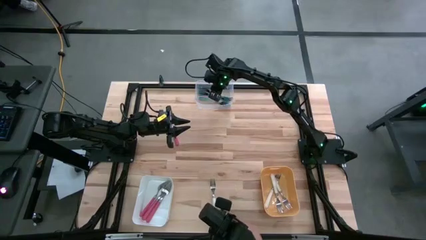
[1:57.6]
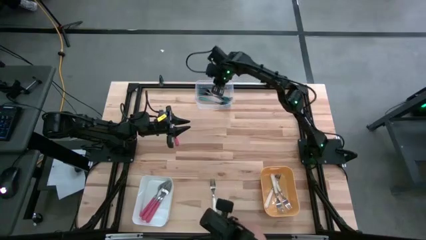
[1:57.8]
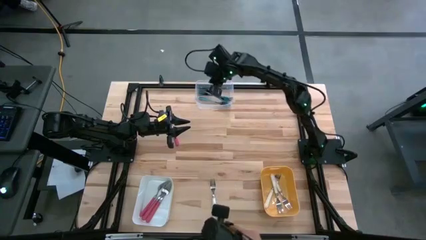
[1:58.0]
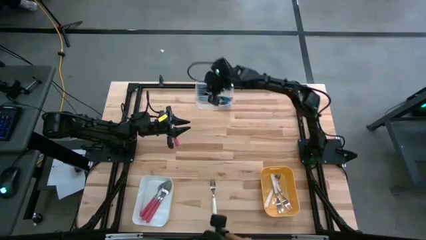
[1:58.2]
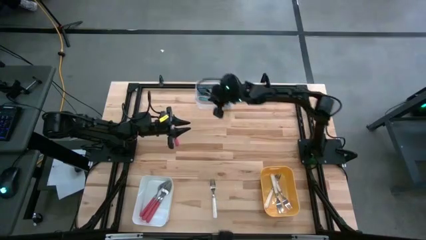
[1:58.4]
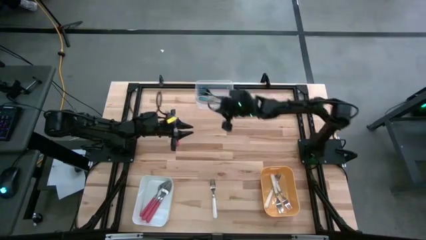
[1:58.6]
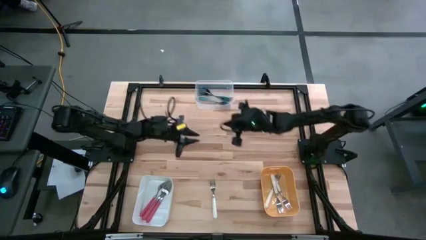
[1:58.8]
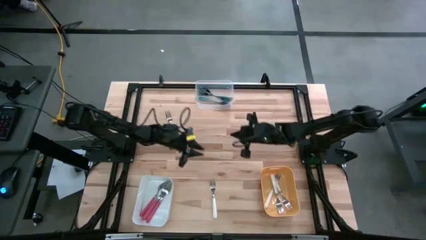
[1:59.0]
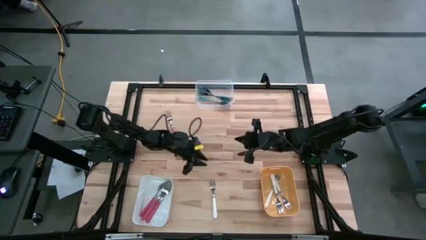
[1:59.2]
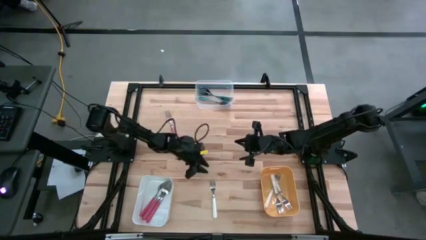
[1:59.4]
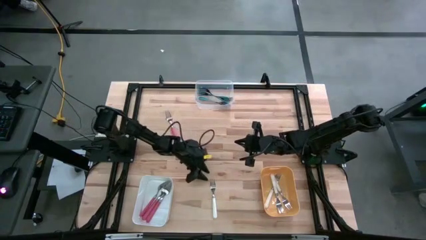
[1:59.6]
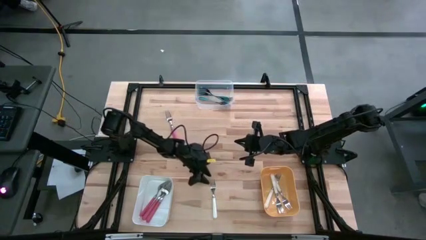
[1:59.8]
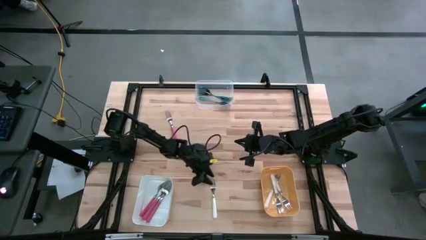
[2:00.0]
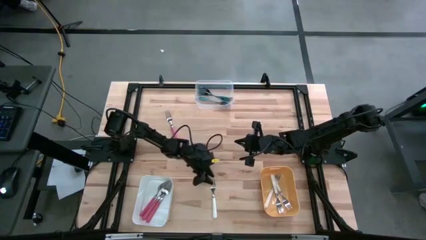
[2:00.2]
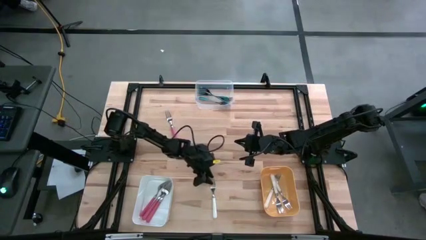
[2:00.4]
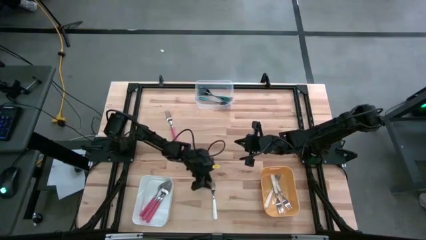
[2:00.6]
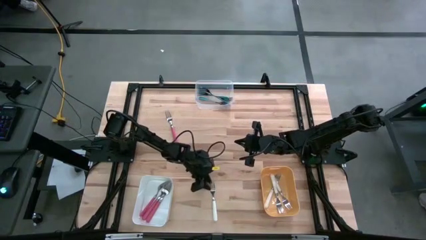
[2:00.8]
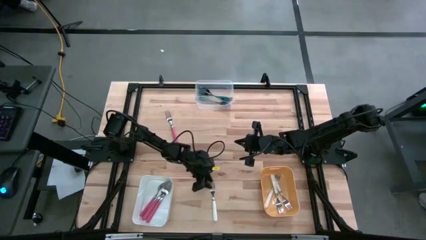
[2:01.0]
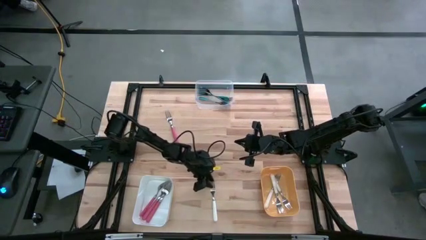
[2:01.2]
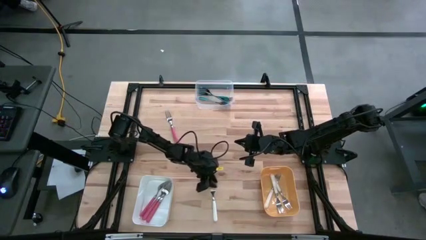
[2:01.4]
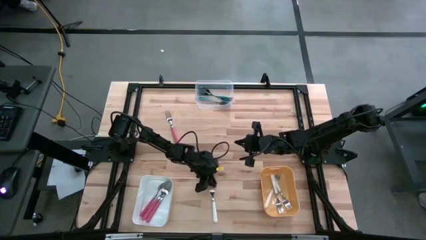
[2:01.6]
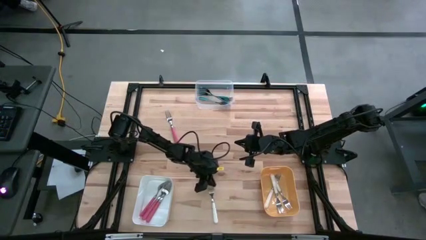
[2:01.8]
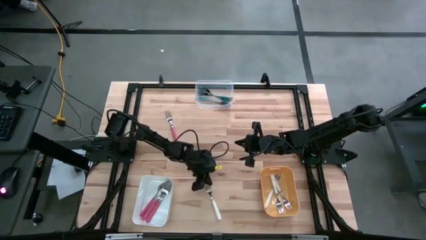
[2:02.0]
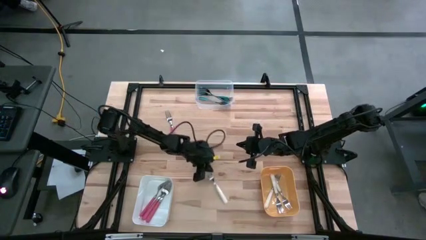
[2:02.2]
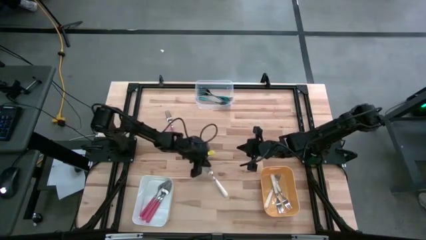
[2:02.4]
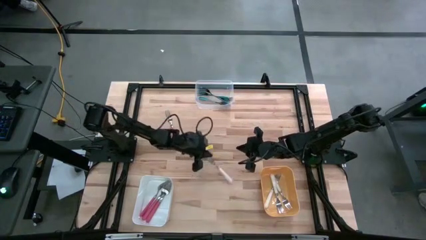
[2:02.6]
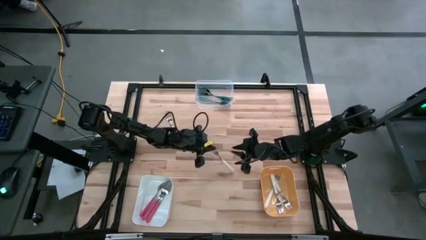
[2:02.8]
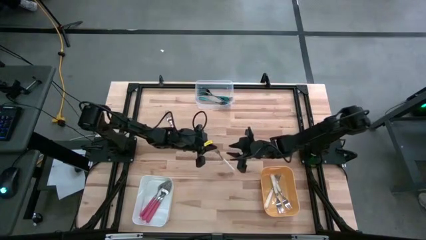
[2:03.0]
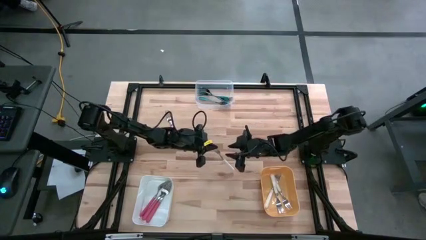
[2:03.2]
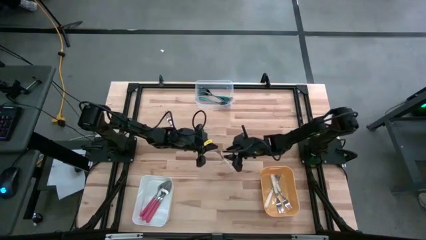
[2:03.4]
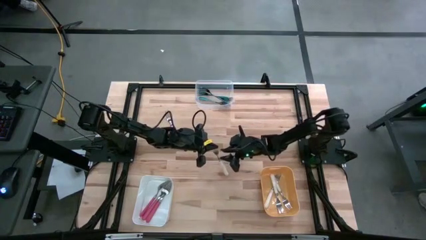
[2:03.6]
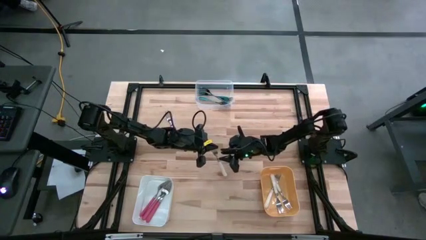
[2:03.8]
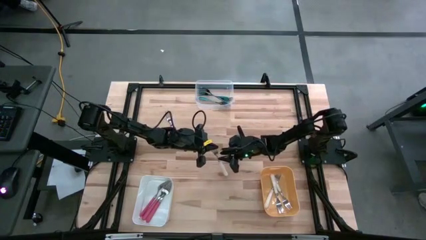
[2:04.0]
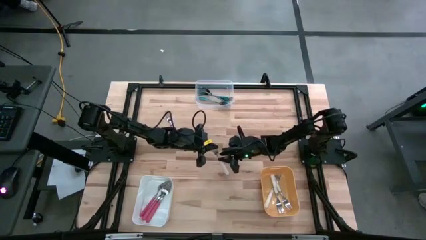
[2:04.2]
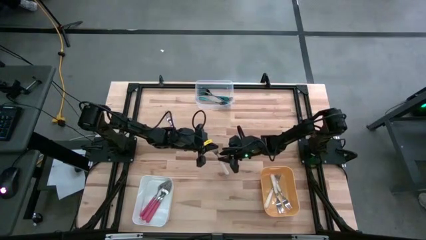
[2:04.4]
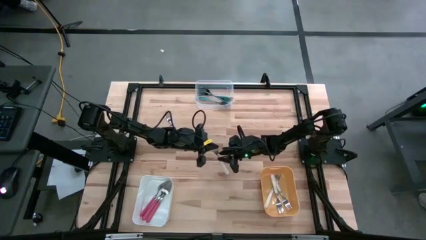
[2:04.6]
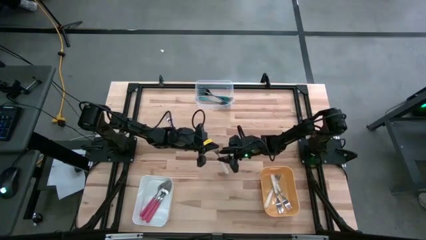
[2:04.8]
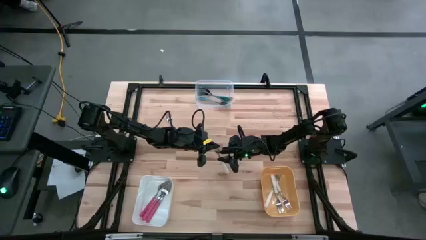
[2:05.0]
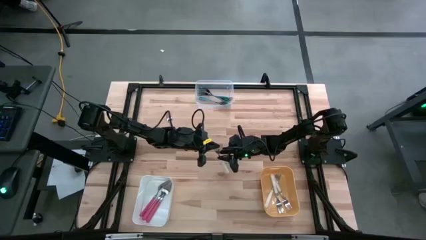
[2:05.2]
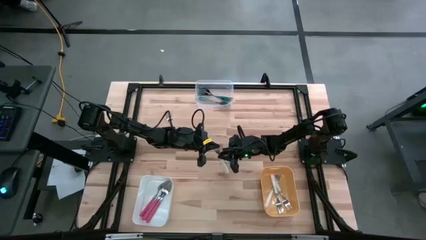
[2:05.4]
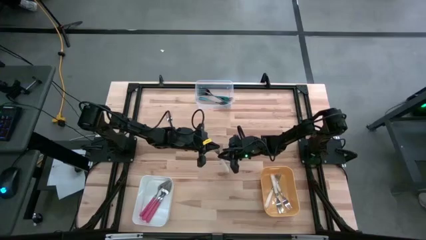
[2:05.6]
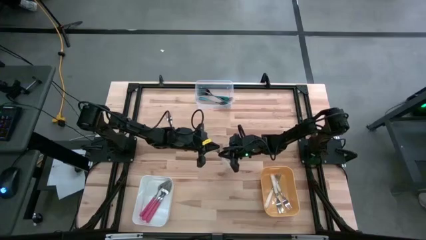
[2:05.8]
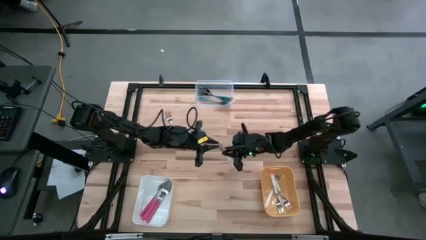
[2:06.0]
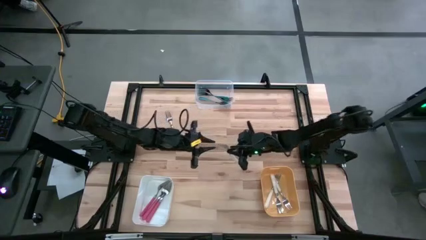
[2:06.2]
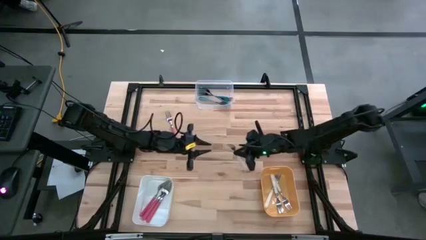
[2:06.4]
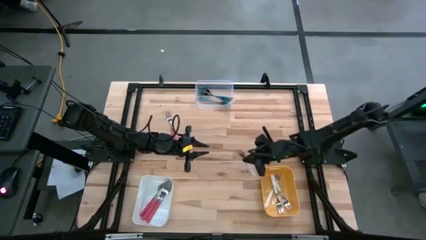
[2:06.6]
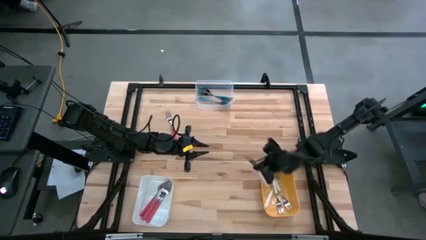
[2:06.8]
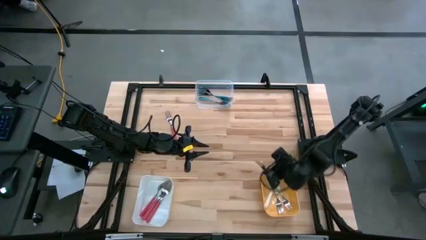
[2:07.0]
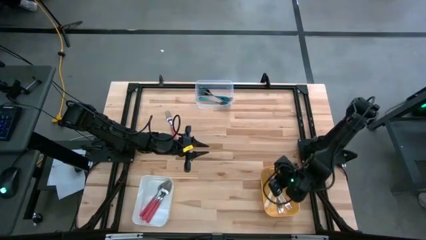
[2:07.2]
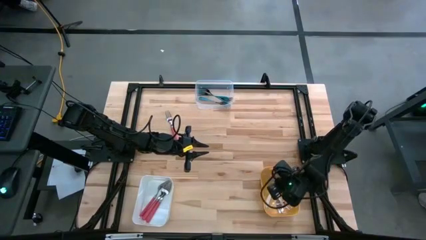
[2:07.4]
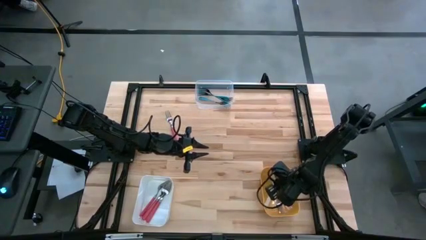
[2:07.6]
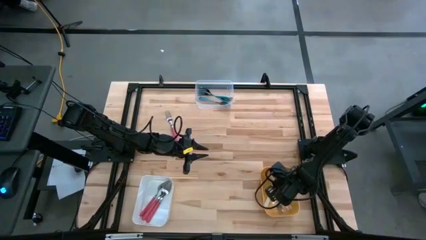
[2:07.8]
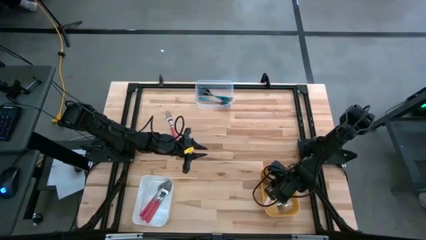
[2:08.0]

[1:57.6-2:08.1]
Task: Sort silverware by color (type)
Put the white fork into the yellow bin

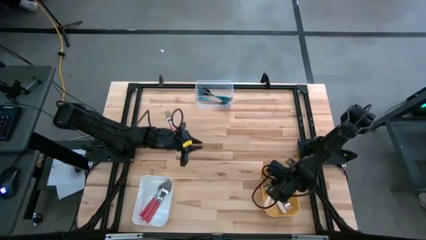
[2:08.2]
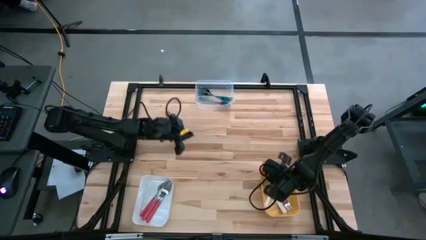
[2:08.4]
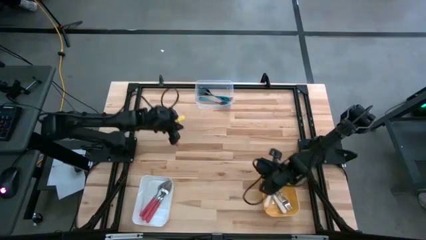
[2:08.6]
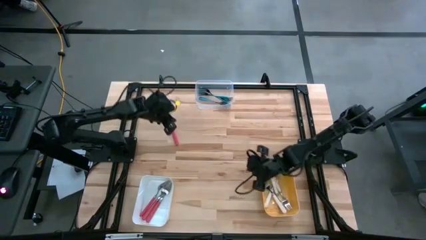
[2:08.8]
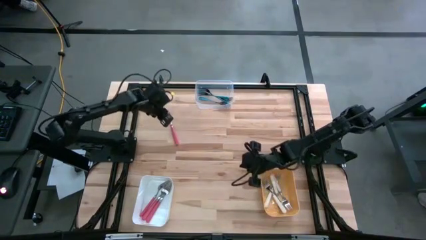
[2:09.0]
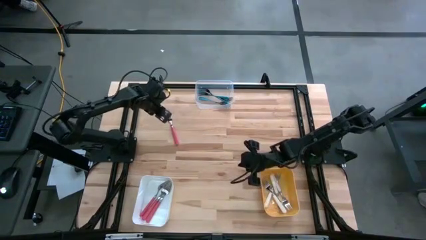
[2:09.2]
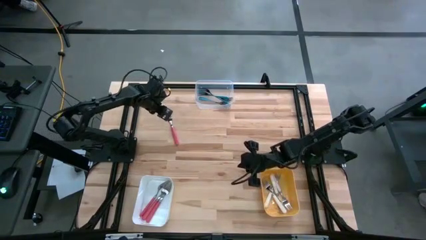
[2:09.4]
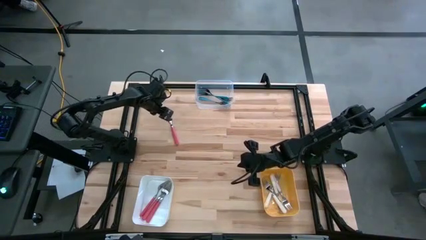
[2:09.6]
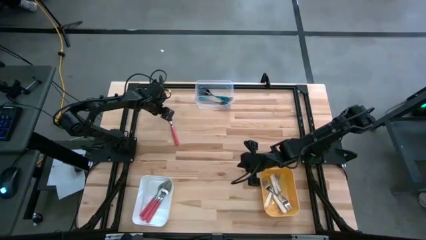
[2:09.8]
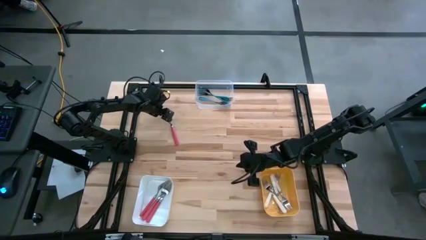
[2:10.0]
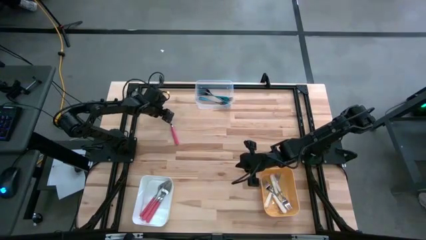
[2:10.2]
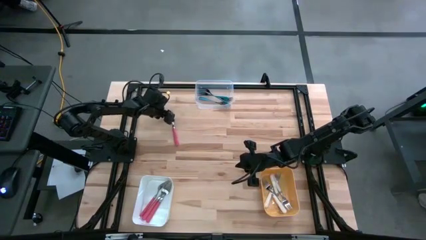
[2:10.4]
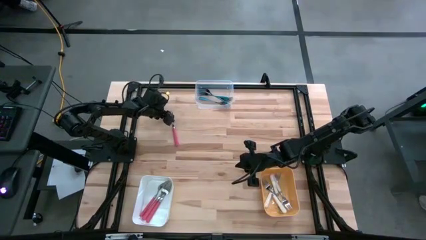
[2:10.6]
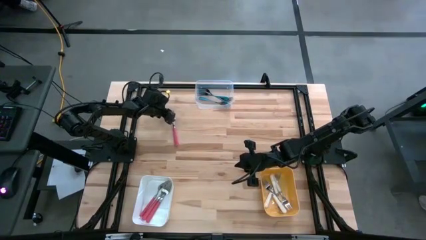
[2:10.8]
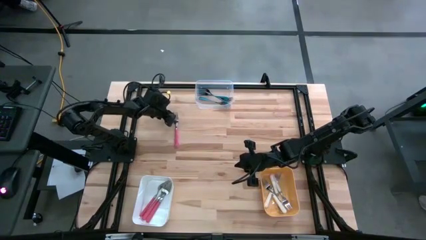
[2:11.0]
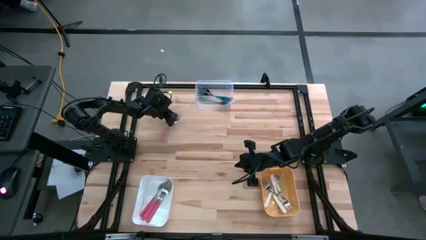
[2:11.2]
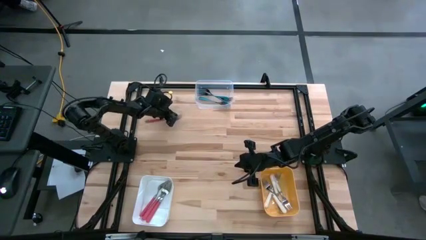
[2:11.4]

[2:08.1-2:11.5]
Put the red fork into the white bin

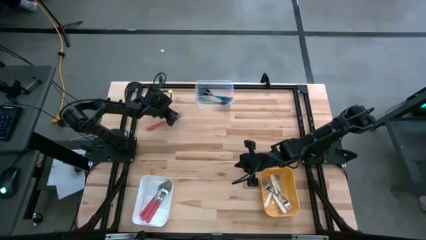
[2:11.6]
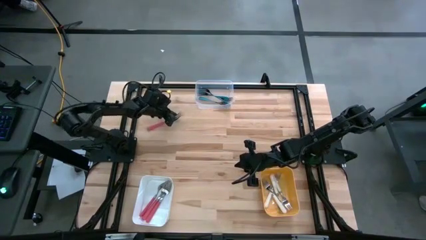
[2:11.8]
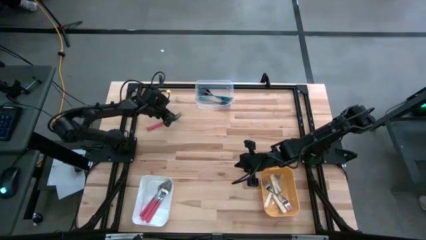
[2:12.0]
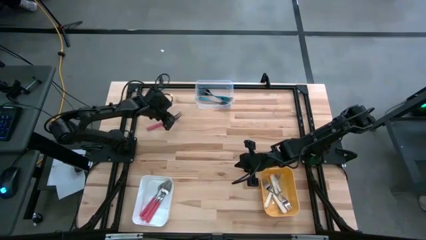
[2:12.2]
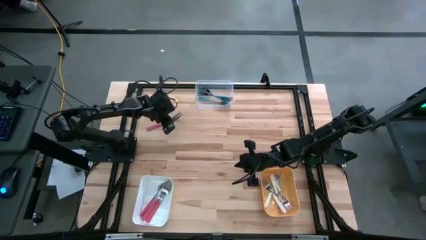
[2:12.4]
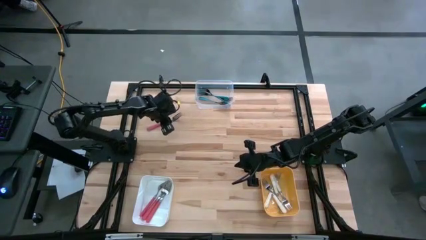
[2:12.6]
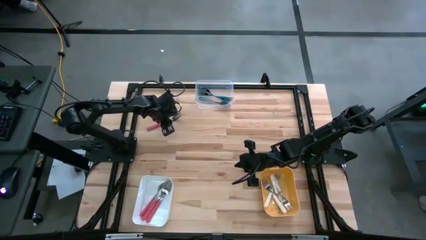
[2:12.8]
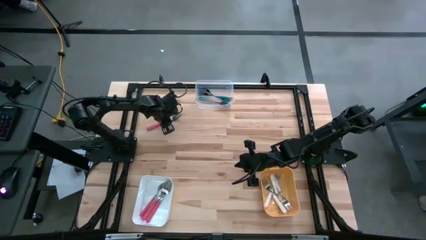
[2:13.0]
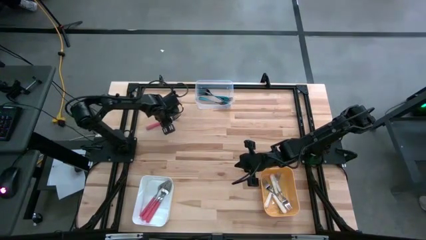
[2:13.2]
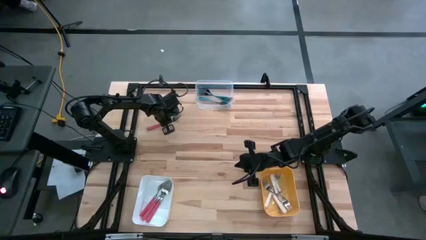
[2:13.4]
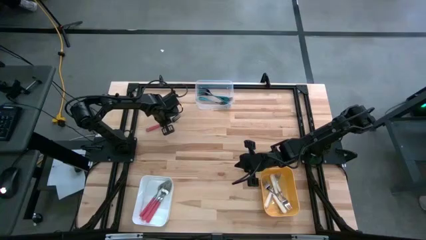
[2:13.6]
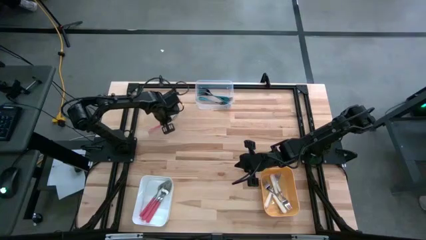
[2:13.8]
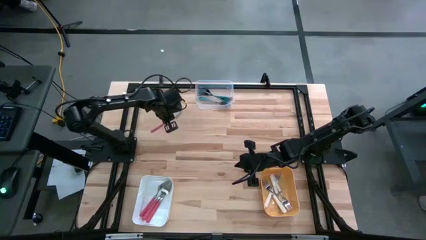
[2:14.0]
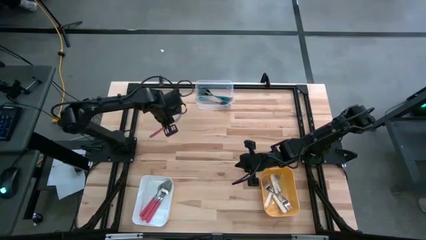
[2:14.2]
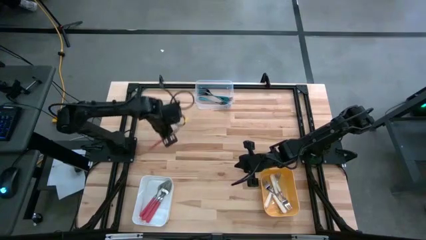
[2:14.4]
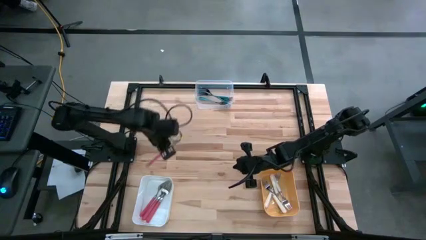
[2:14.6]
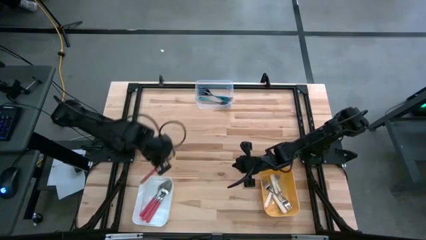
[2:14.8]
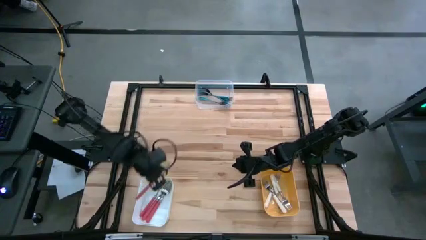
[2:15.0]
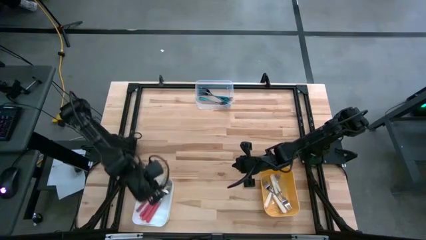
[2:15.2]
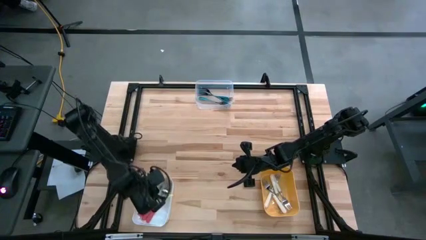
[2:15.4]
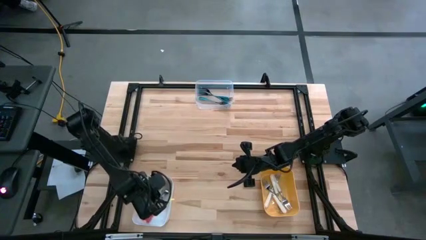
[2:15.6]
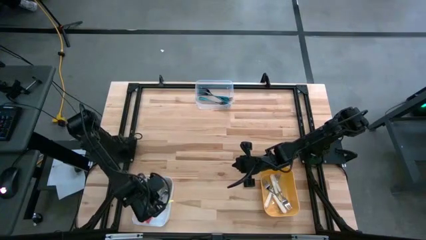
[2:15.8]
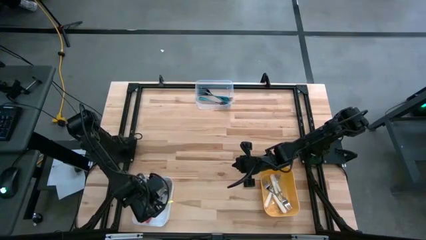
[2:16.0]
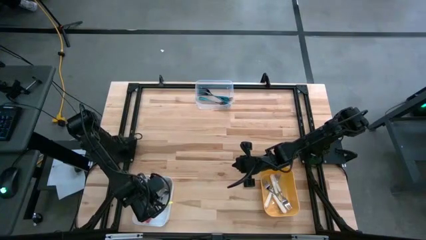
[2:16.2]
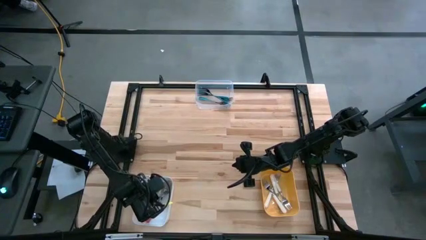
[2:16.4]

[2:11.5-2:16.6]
Put the red fork into the white bin
